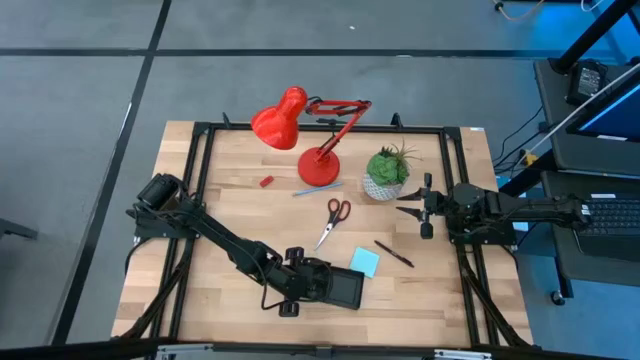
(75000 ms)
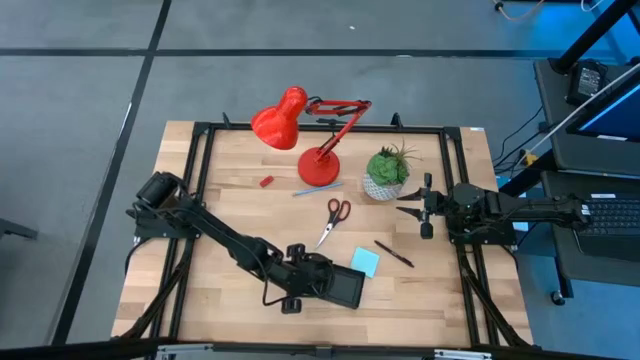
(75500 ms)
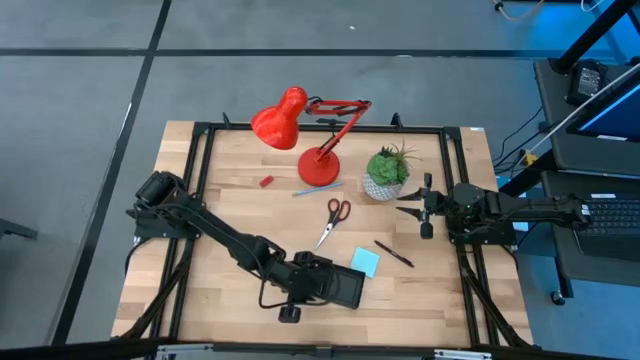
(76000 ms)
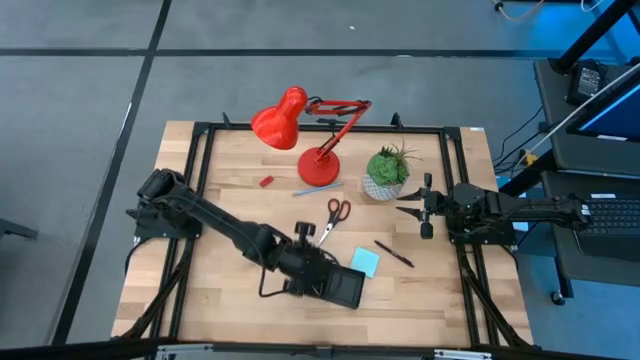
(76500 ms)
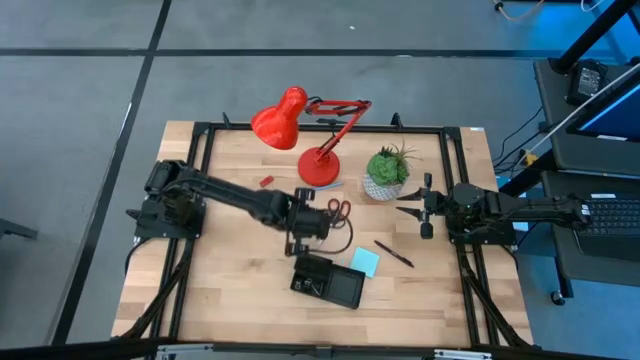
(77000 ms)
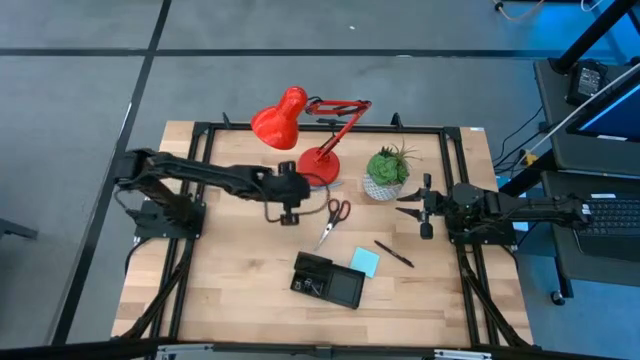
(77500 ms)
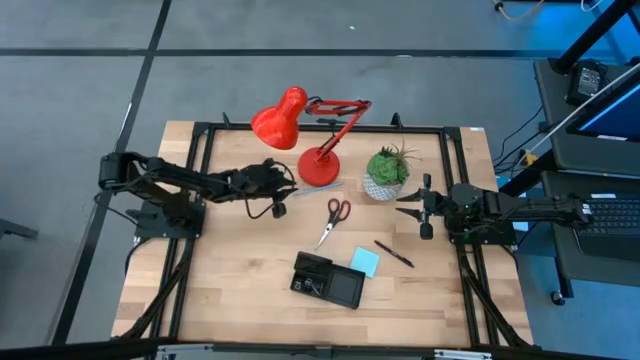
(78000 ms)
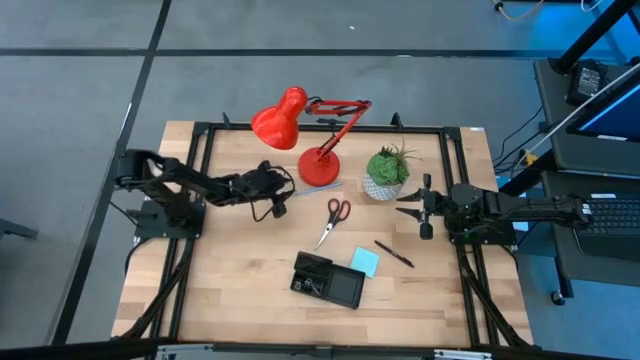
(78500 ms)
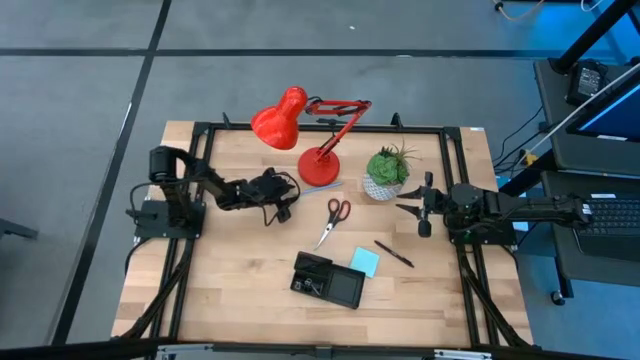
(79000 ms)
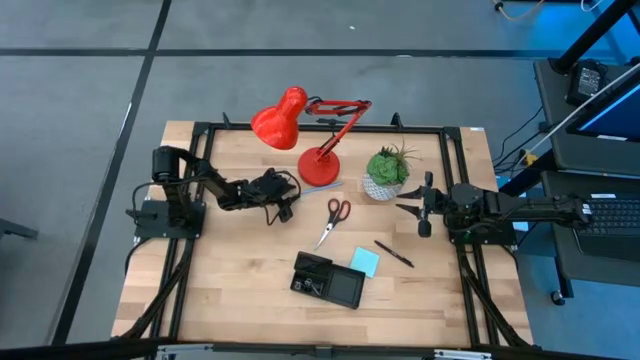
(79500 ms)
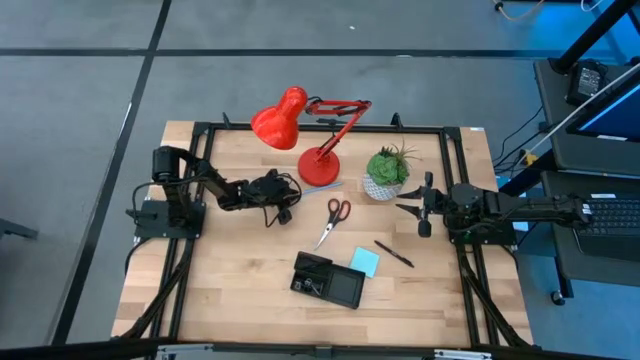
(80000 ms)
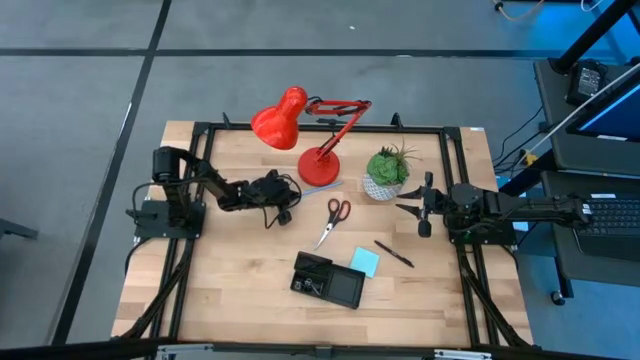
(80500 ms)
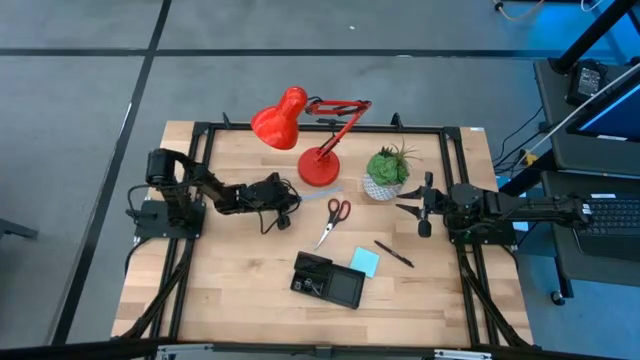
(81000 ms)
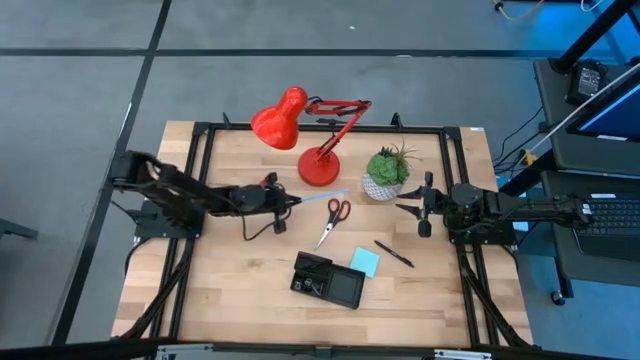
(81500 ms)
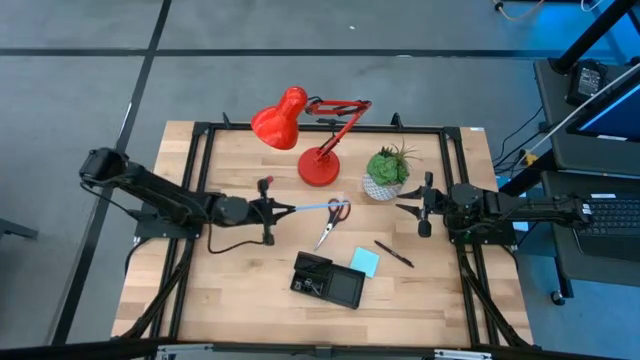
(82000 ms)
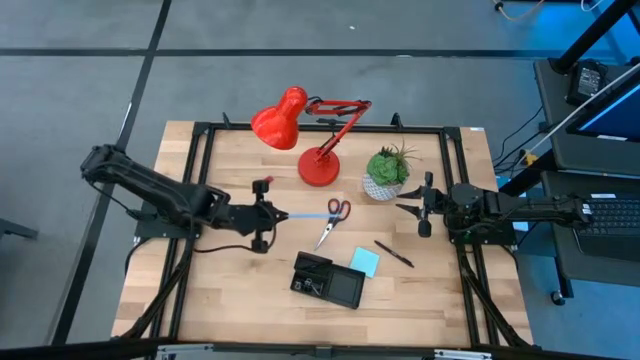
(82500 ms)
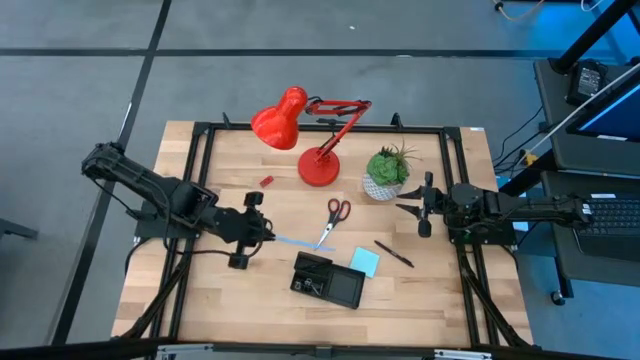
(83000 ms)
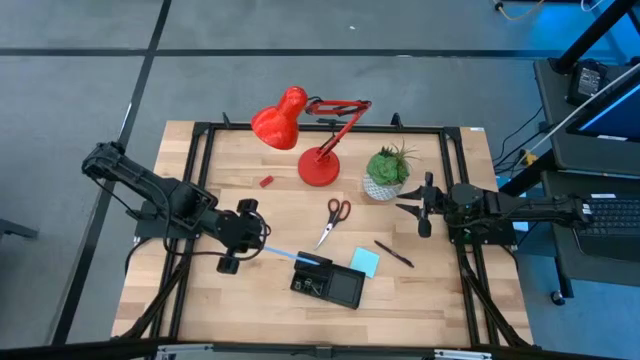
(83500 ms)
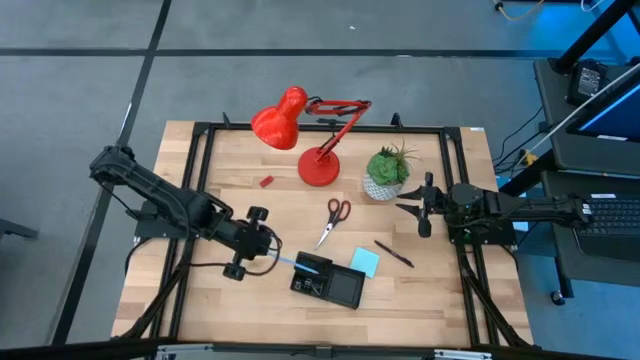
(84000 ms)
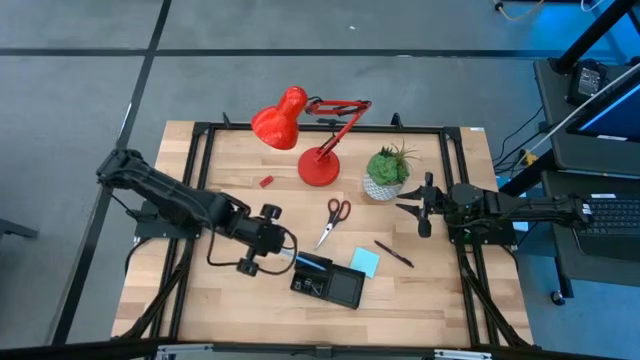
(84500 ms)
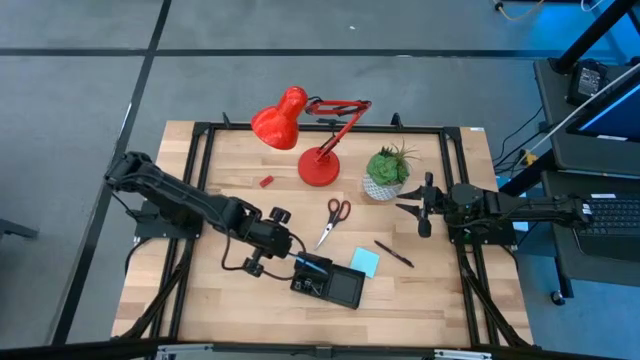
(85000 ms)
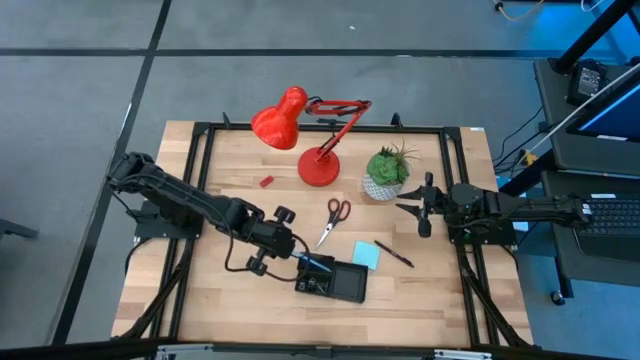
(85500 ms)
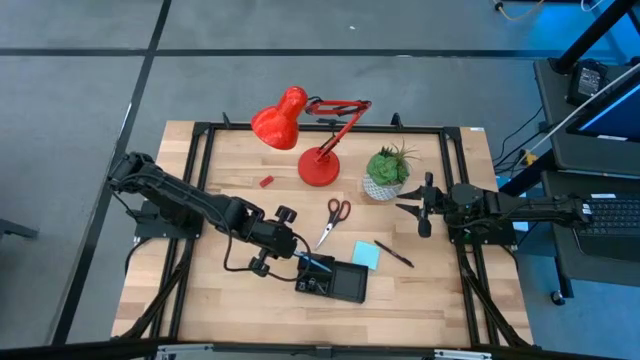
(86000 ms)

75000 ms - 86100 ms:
Task: Pick and place office supplies into organizer
Put the light blue pencil into the black desk organizer

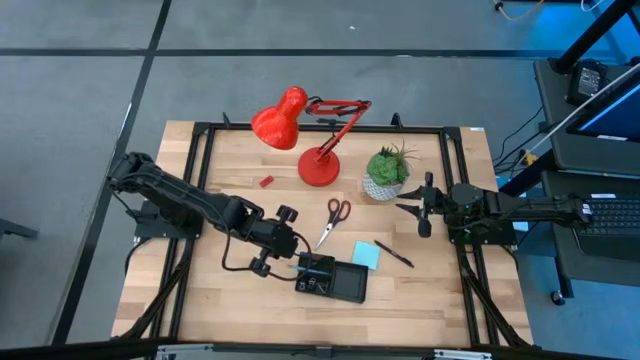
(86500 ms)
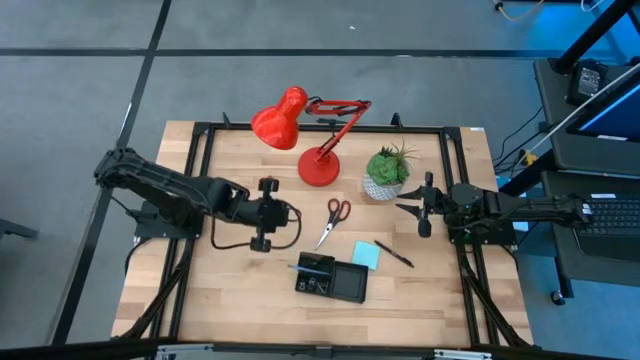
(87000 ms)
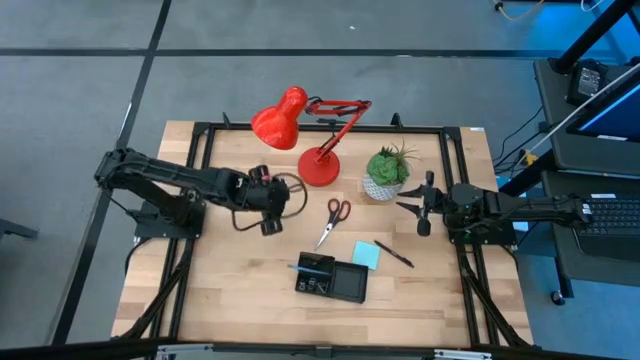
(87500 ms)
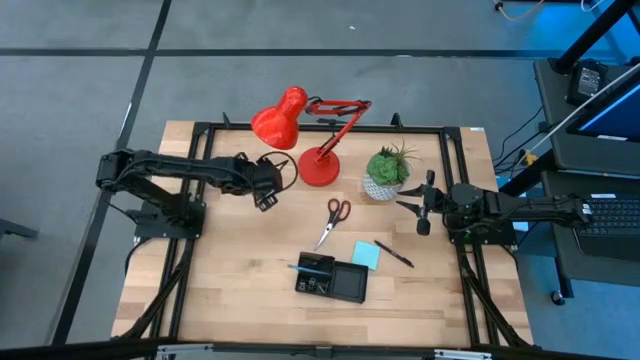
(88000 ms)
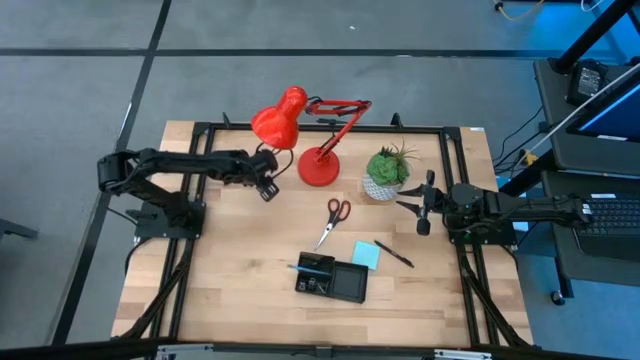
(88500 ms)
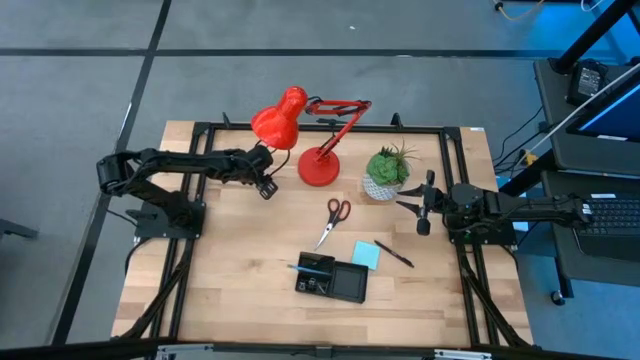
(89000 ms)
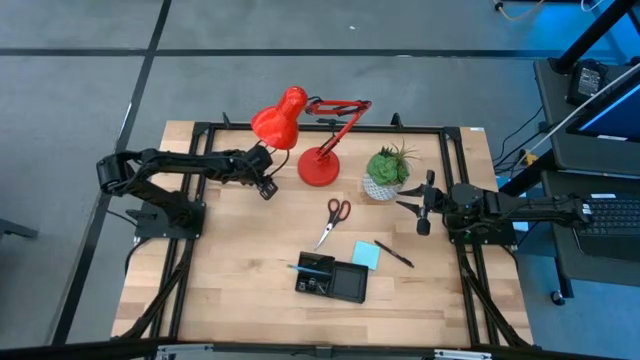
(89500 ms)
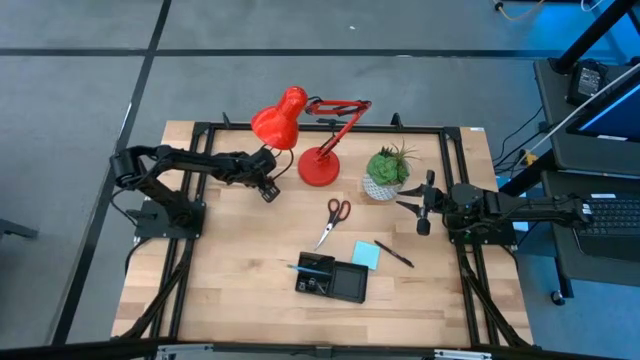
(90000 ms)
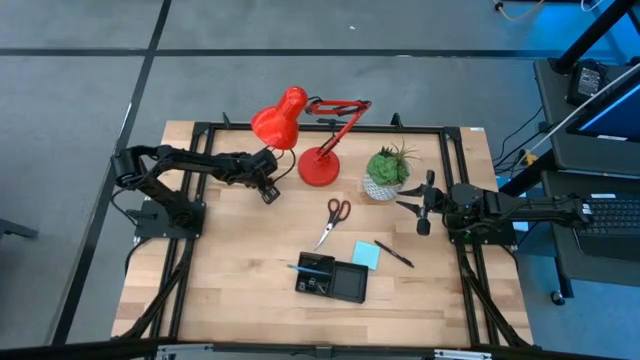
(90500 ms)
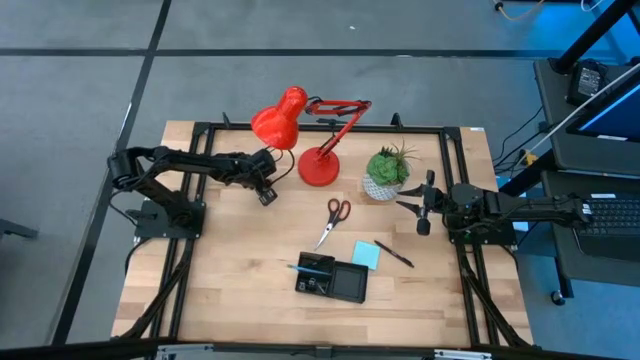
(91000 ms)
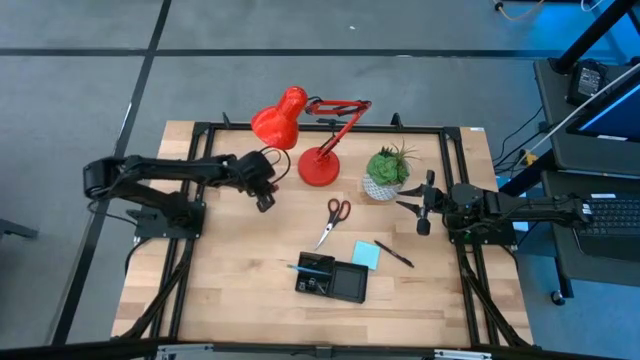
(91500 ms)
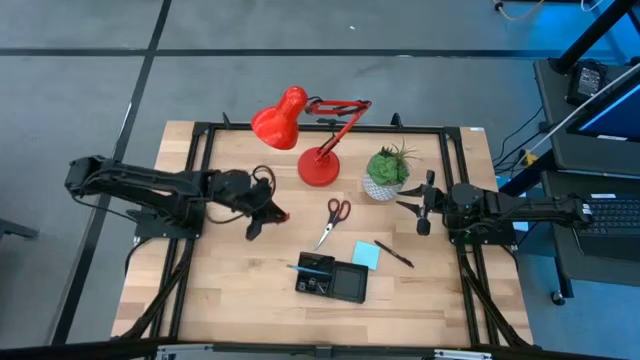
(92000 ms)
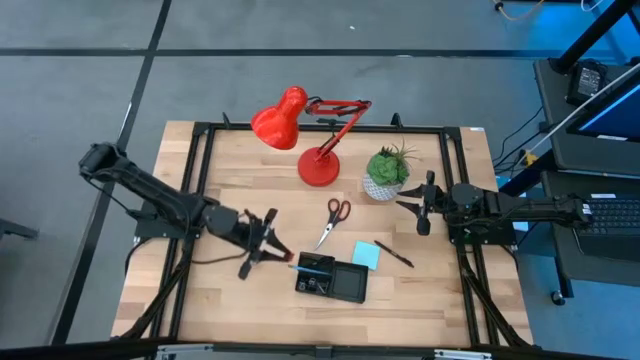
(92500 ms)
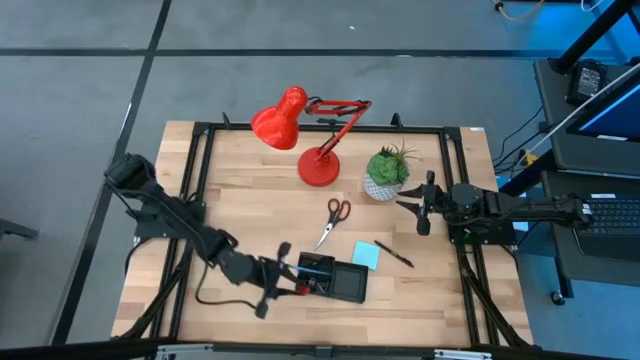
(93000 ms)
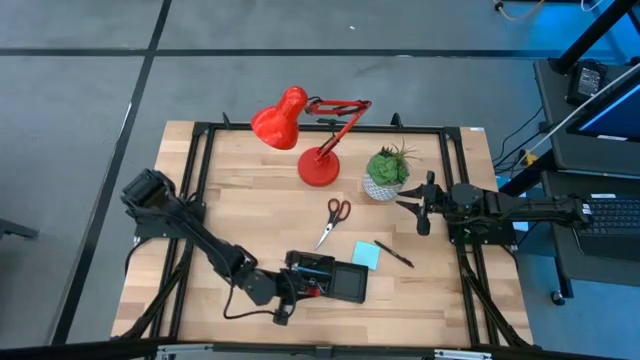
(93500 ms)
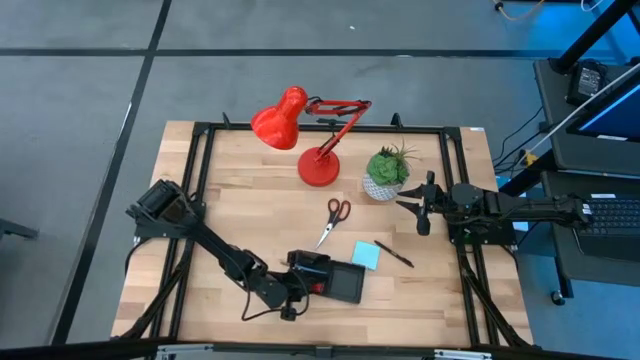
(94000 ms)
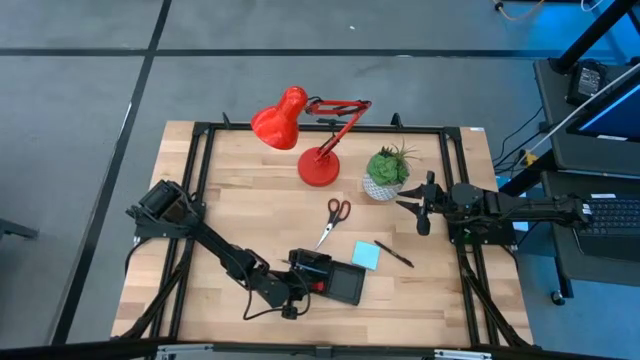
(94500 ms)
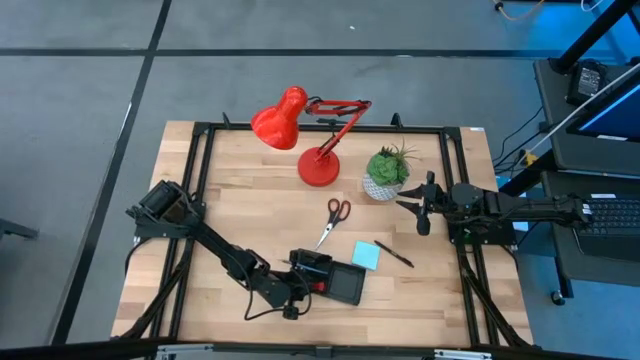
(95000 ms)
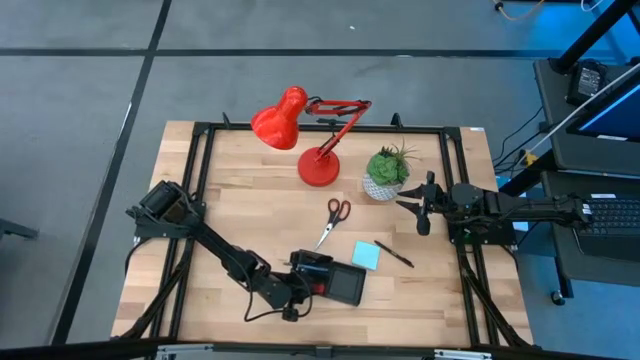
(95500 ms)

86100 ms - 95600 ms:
Put the orange eraser into the black desk organizer
